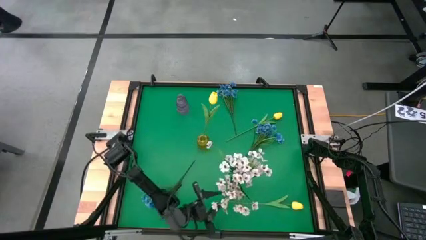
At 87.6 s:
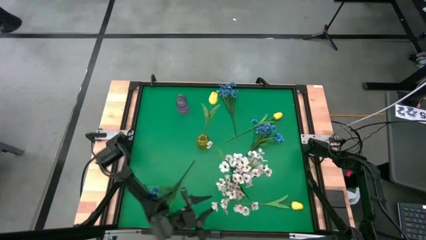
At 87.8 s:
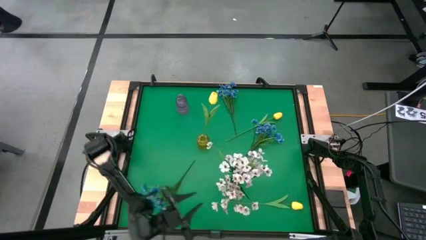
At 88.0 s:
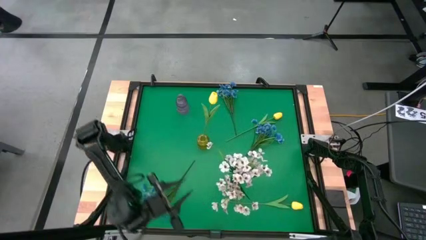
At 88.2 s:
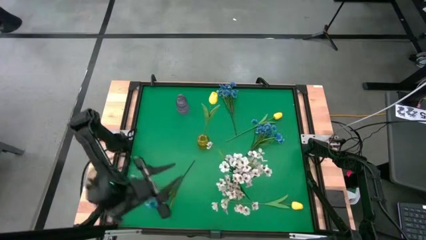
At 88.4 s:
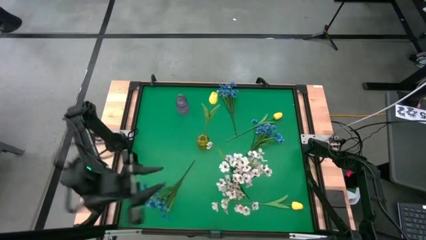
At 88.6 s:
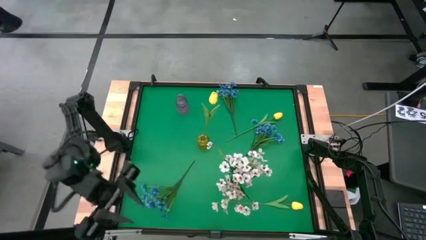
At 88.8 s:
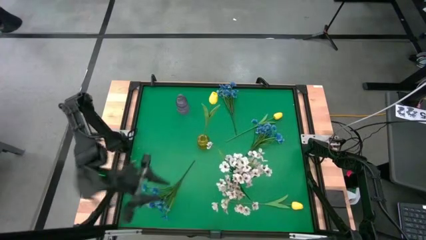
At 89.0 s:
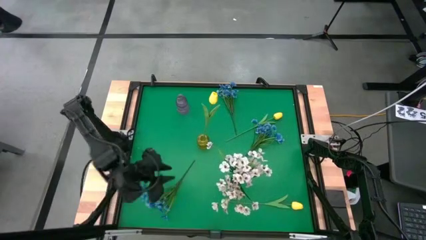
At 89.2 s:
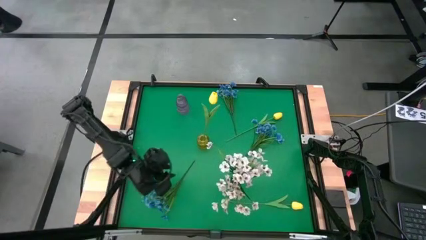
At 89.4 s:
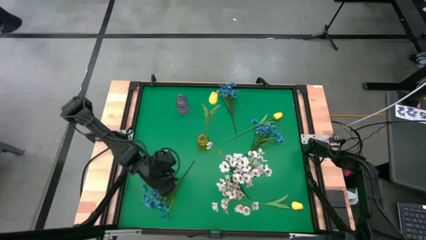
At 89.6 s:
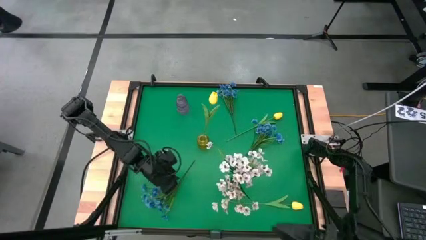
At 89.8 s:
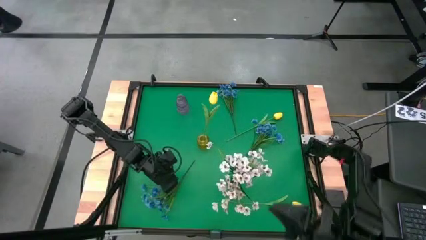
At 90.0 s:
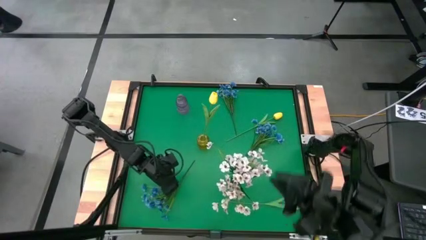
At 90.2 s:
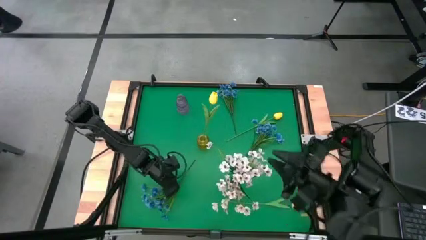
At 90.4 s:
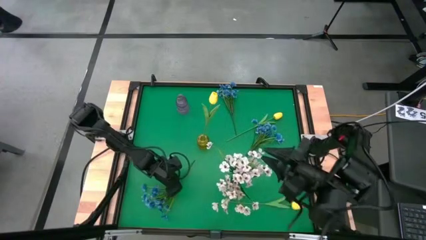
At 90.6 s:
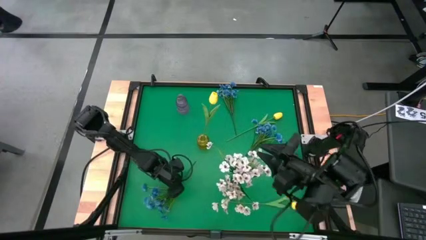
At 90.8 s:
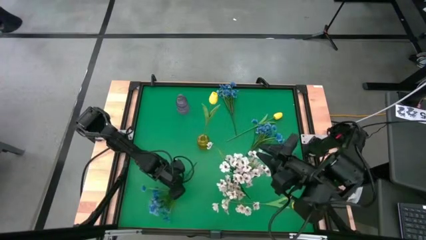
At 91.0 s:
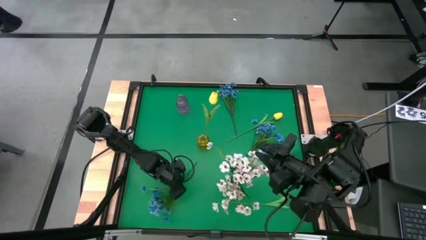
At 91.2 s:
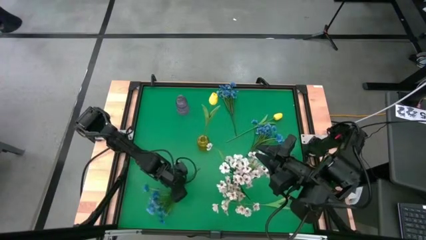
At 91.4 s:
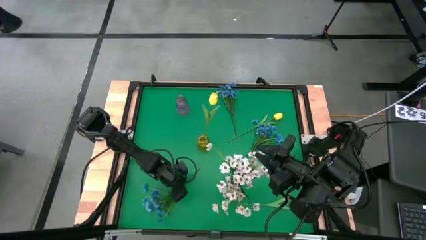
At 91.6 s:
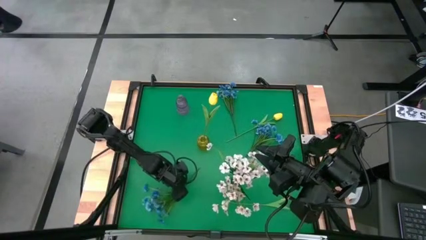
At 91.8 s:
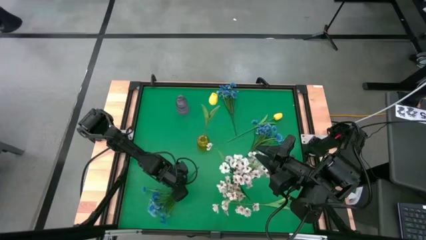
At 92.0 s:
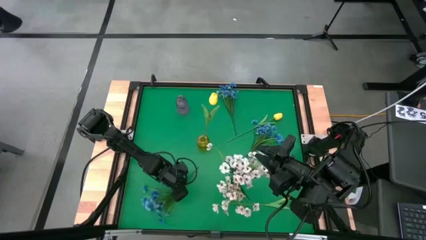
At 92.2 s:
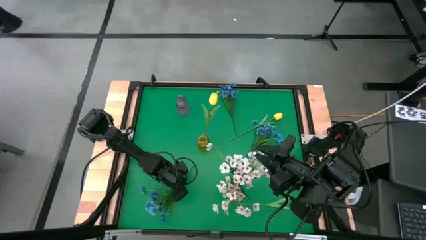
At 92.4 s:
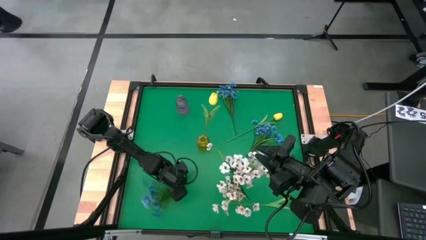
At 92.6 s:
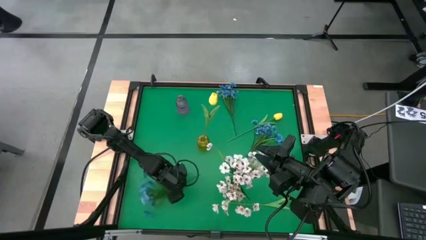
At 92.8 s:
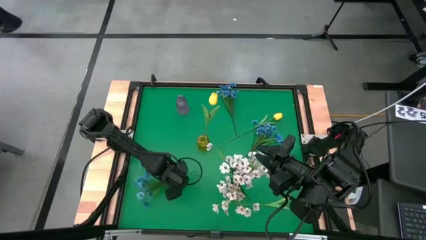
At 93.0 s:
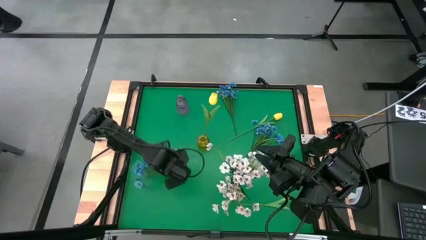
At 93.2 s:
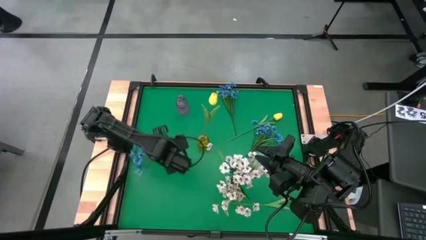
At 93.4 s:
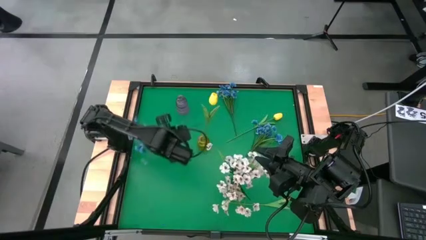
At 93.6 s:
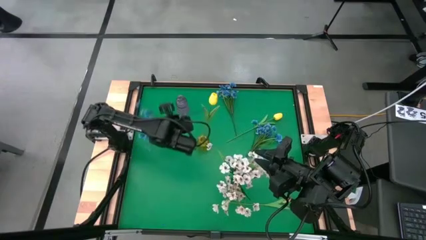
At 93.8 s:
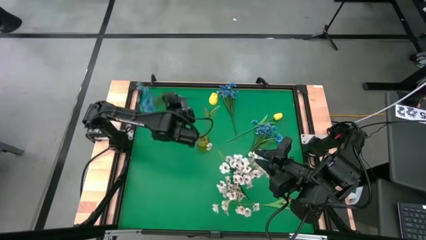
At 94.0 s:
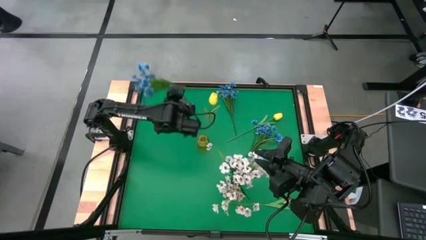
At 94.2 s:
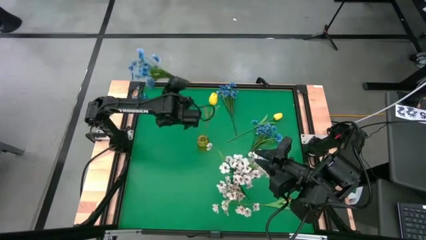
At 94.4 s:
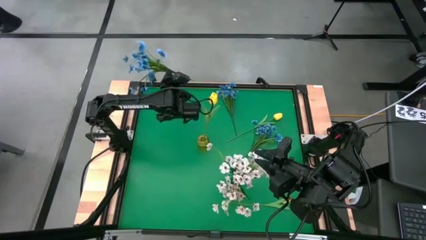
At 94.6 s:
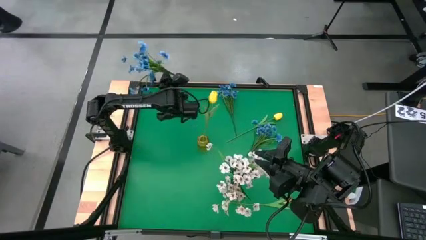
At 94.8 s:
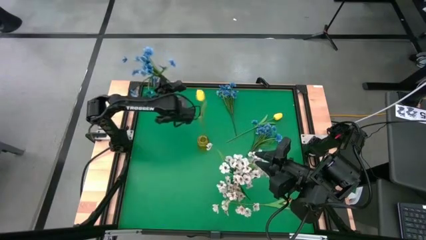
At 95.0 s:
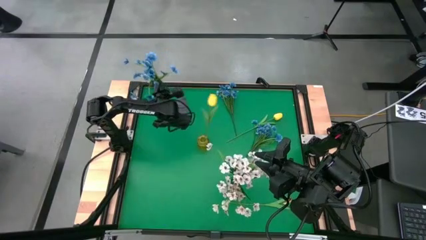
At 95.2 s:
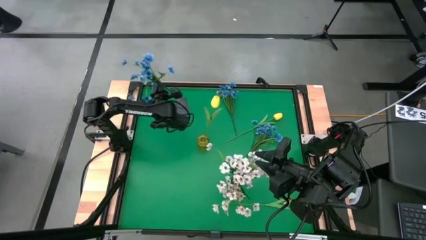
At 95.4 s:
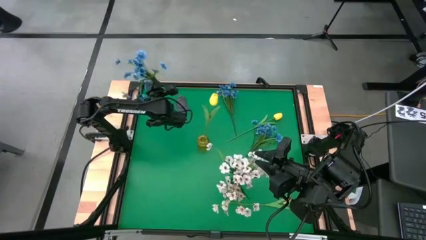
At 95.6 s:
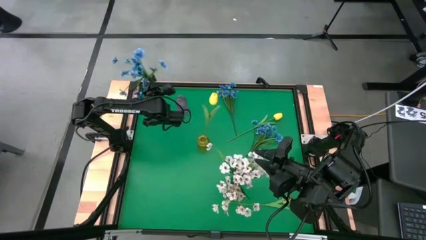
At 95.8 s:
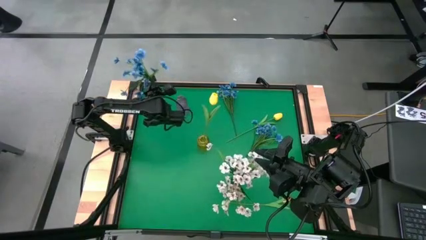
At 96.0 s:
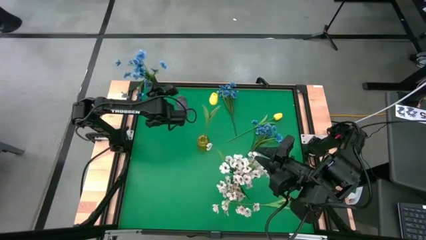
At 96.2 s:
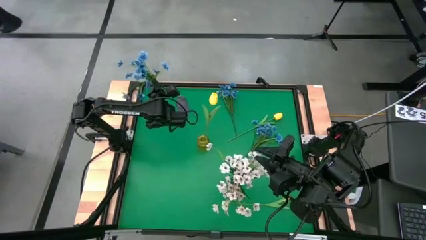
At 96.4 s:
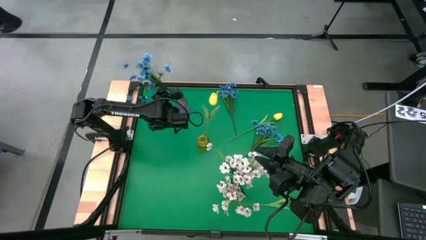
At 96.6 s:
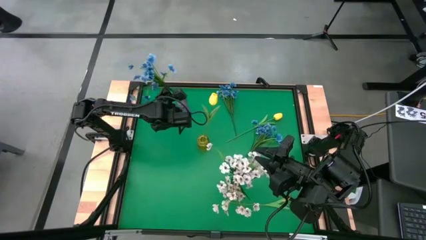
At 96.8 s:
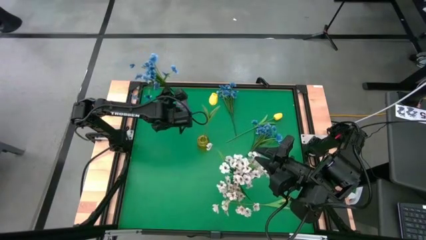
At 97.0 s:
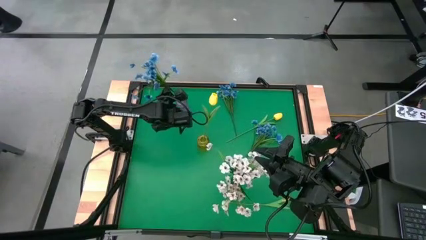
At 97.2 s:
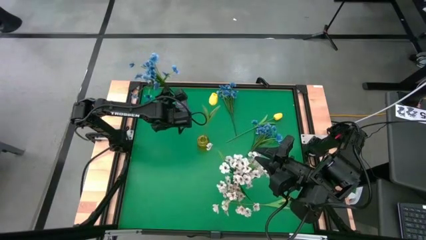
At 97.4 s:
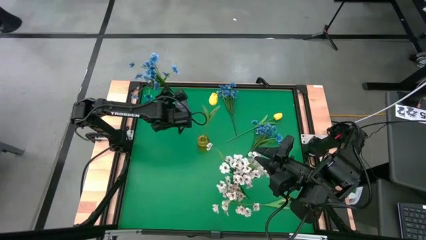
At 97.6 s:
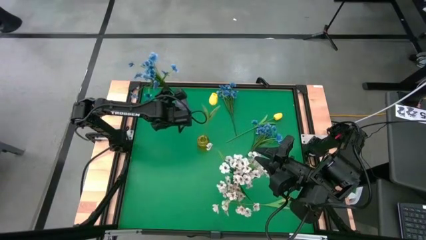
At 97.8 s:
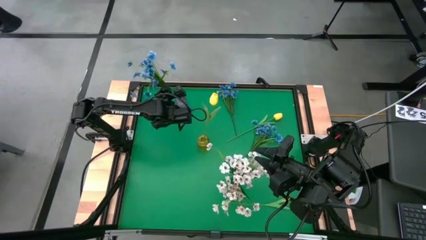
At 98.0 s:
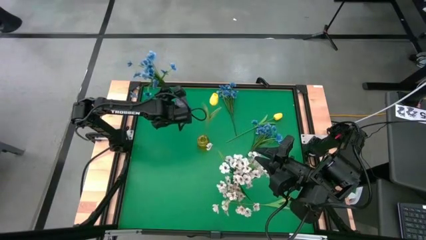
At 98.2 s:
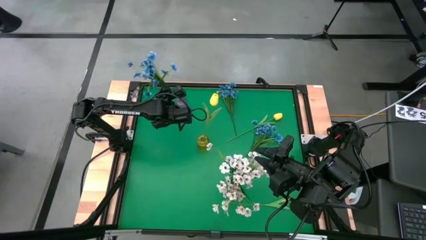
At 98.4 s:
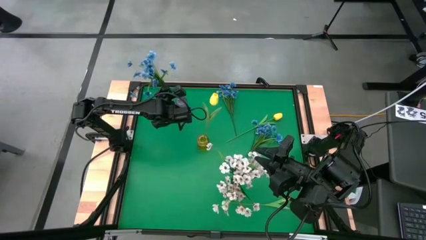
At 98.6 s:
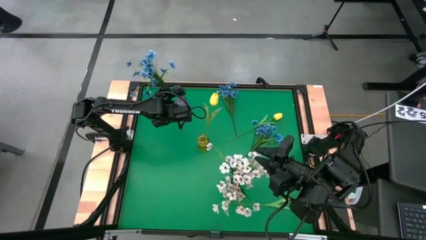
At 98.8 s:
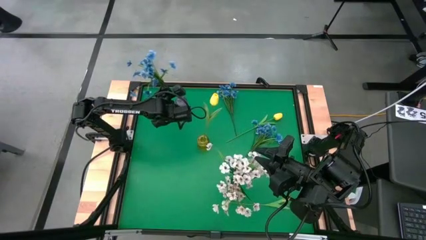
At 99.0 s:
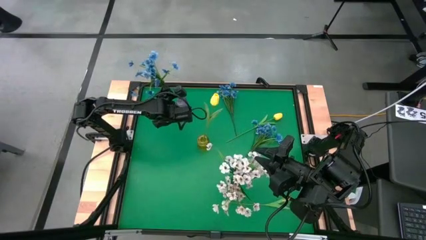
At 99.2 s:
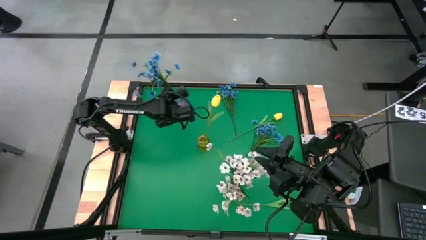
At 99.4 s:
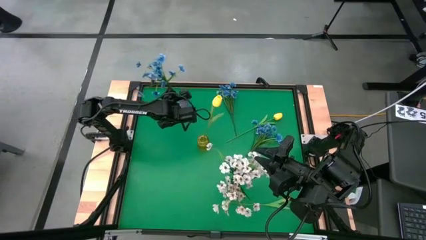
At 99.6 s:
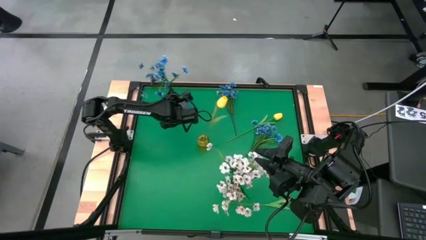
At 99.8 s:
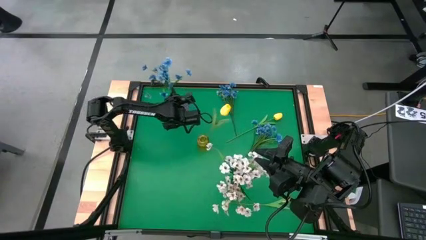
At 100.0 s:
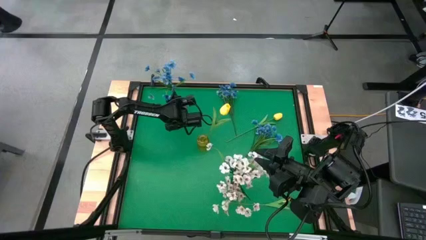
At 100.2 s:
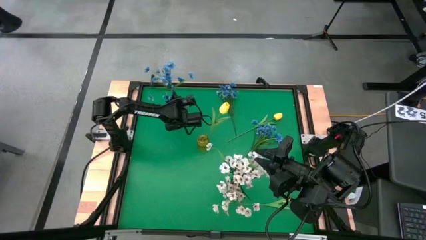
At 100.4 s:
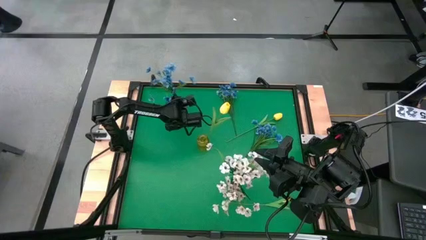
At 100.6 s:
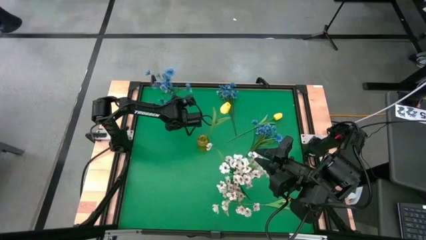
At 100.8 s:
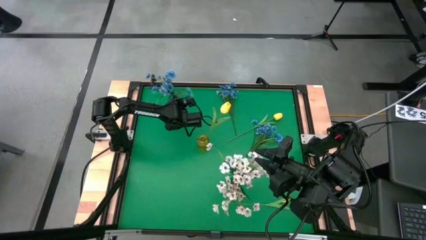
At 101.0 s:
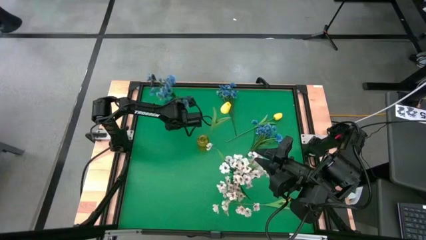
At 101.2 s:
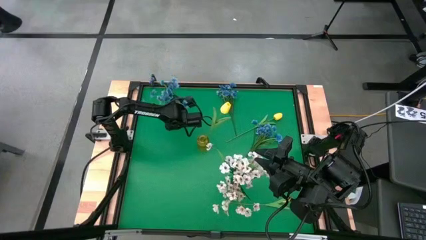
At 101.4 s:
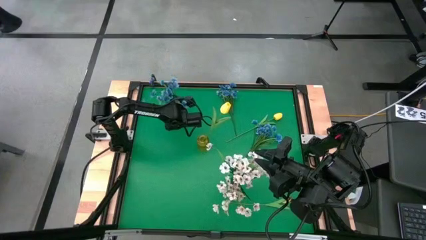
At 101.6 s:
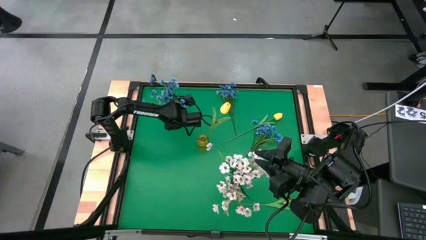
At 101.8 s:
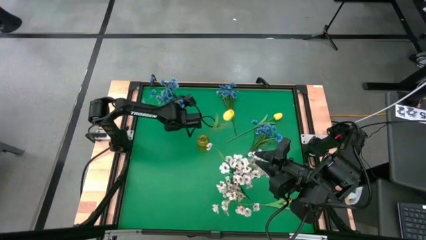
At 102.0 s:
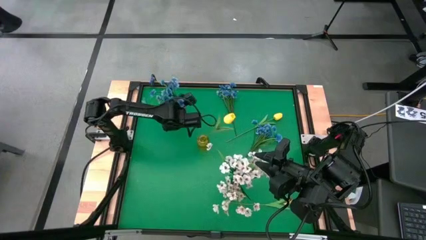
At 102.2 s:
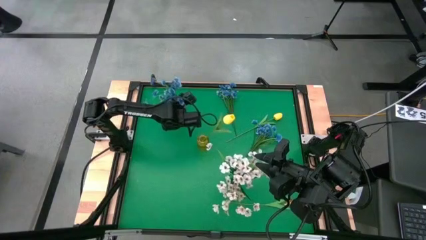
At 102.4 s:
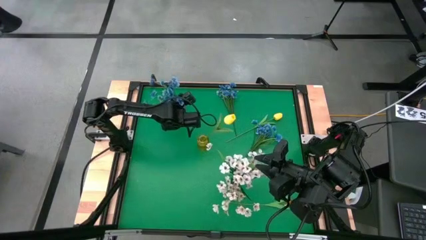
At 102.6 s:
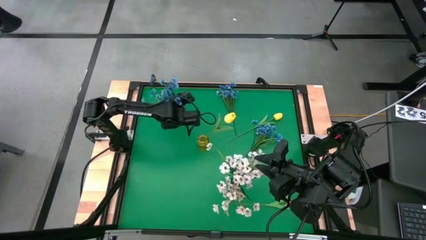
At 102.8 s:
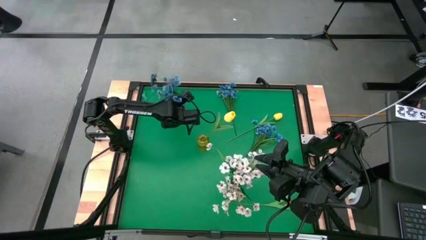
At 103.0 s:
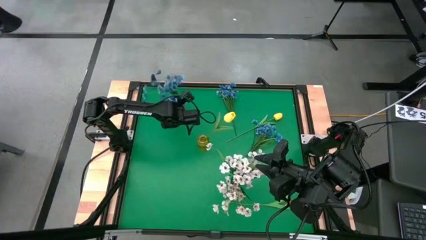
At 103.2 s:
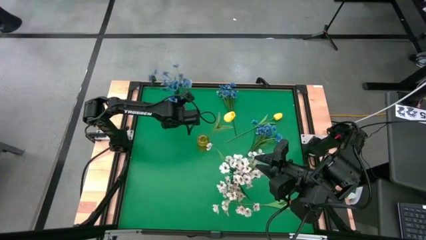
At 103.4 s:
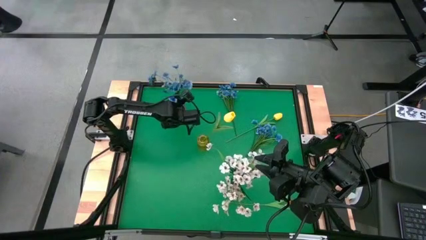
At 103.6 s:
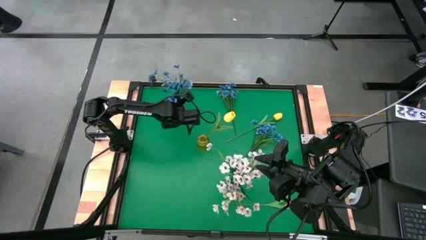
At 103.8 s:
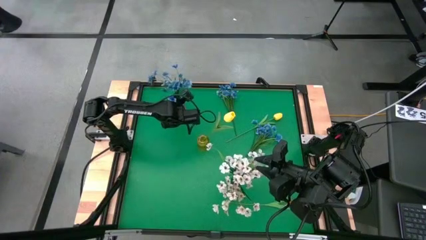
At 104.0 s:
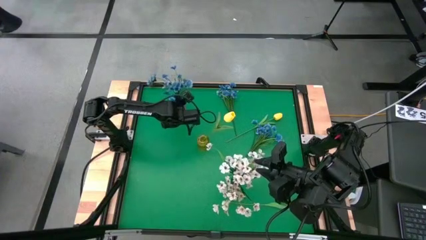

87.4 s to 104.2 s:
Task: Sort flowers into vase by color
Put the bottom blue flowers into the purple vase
